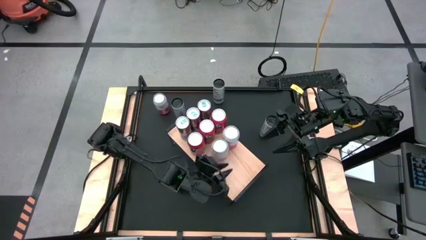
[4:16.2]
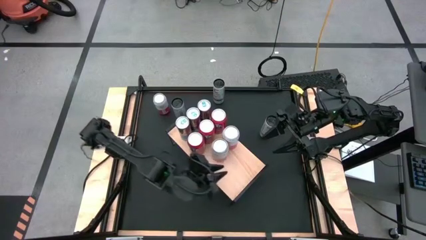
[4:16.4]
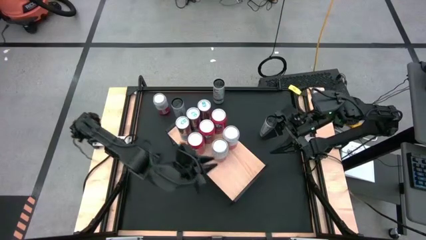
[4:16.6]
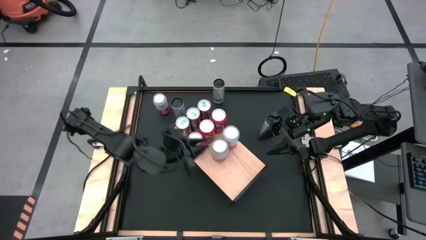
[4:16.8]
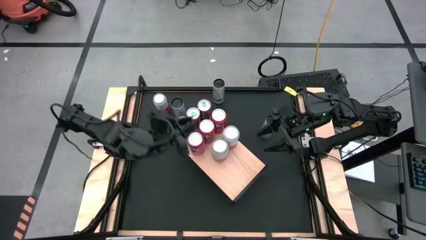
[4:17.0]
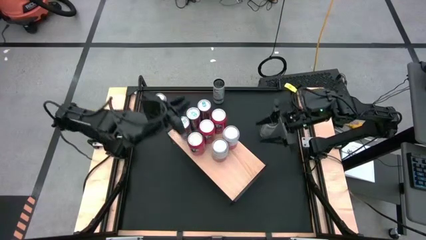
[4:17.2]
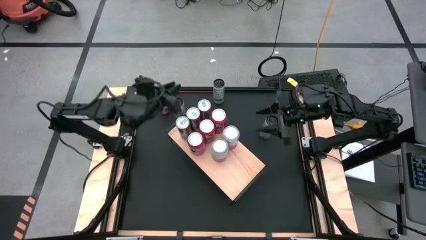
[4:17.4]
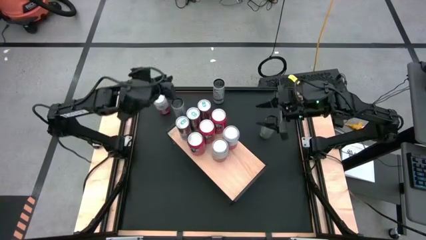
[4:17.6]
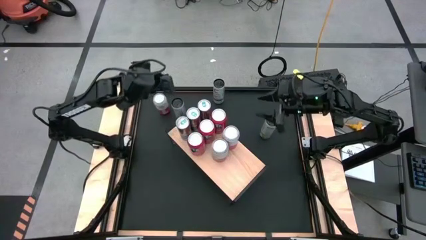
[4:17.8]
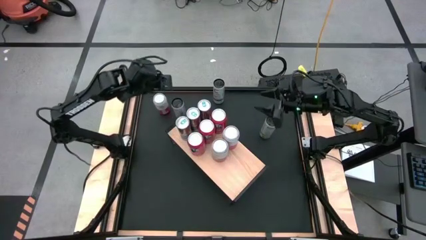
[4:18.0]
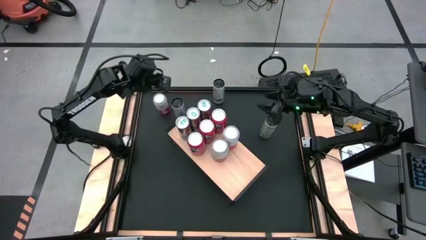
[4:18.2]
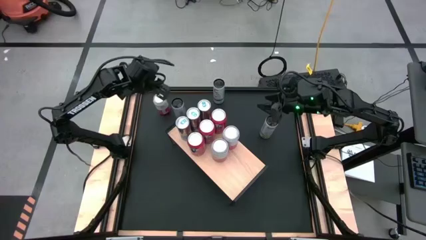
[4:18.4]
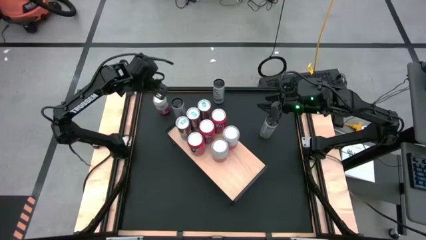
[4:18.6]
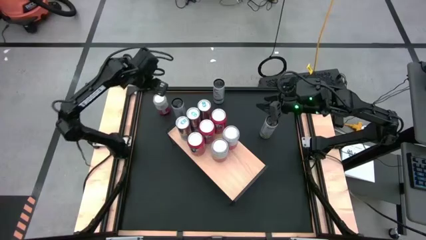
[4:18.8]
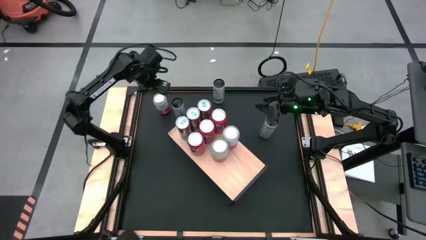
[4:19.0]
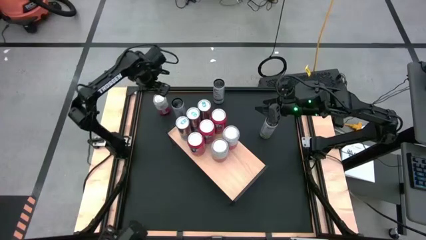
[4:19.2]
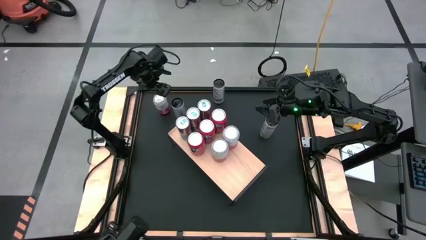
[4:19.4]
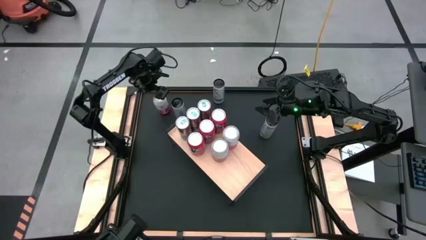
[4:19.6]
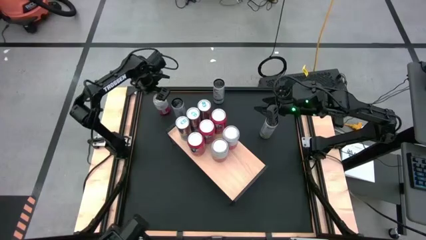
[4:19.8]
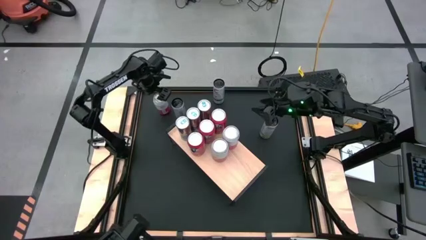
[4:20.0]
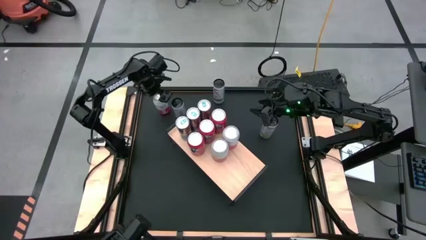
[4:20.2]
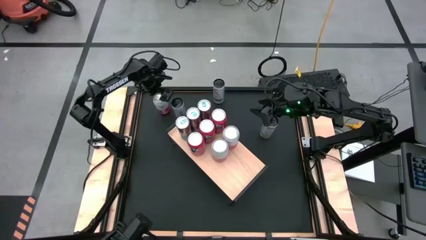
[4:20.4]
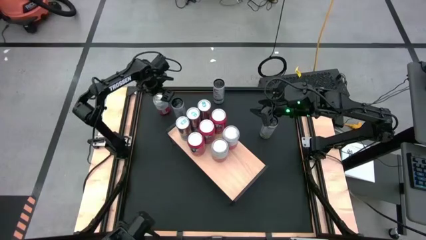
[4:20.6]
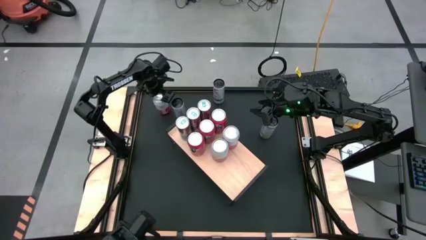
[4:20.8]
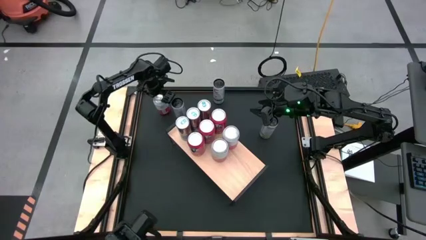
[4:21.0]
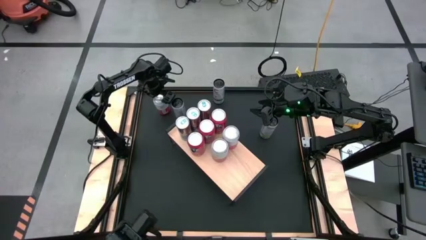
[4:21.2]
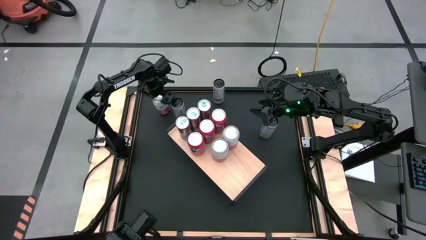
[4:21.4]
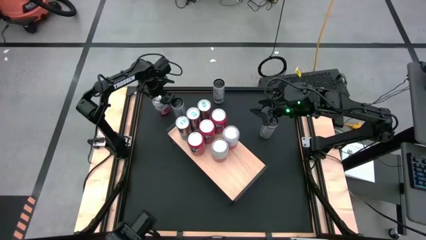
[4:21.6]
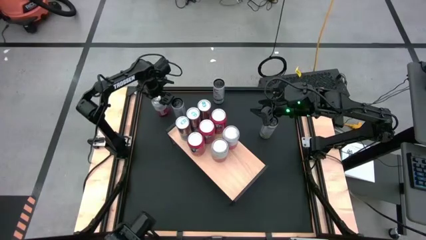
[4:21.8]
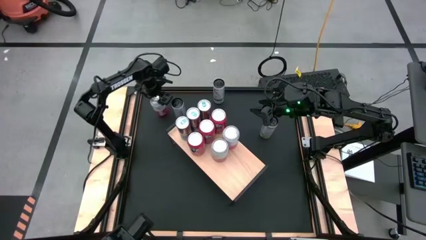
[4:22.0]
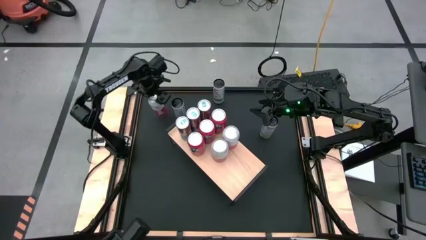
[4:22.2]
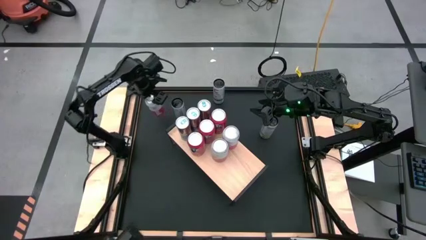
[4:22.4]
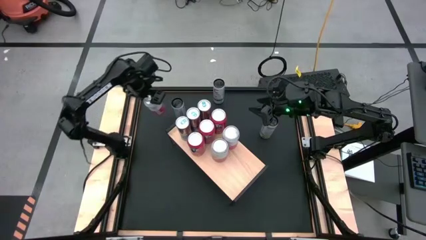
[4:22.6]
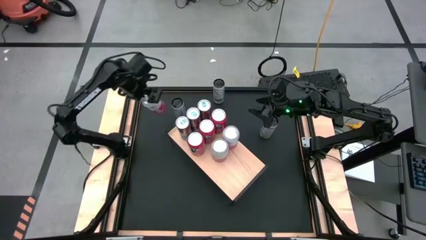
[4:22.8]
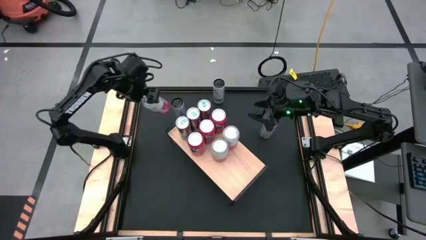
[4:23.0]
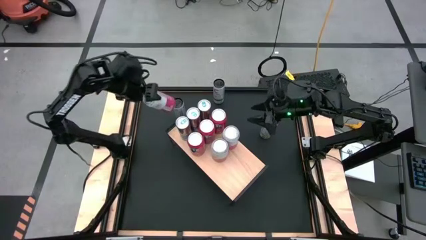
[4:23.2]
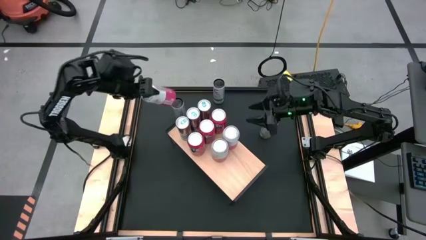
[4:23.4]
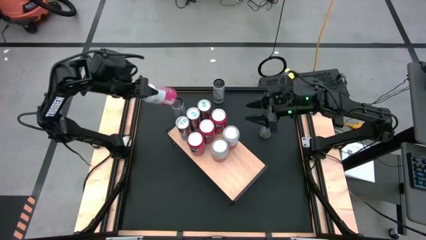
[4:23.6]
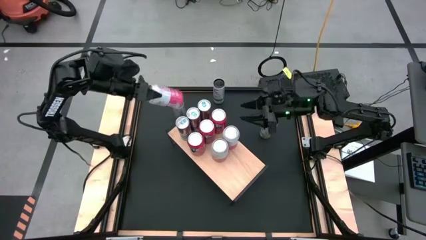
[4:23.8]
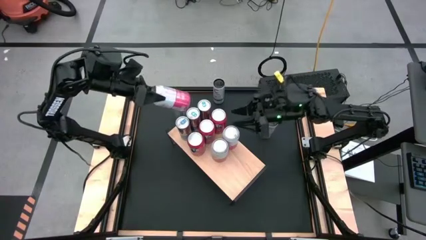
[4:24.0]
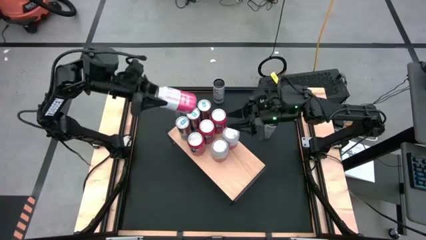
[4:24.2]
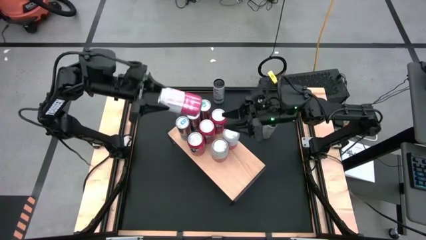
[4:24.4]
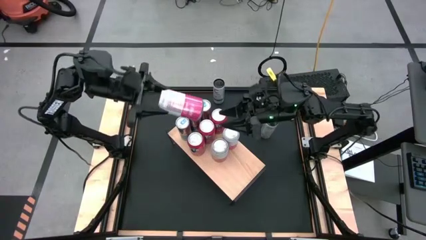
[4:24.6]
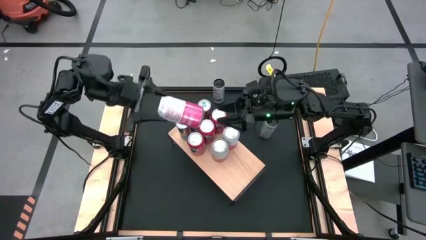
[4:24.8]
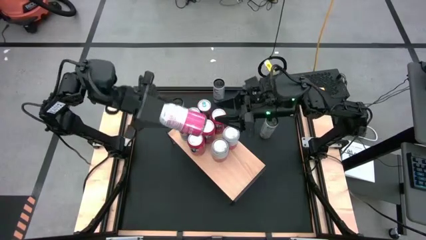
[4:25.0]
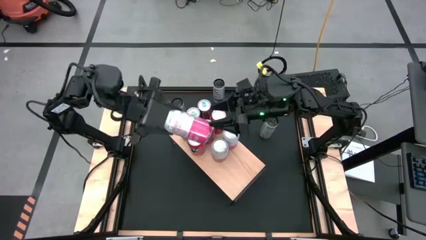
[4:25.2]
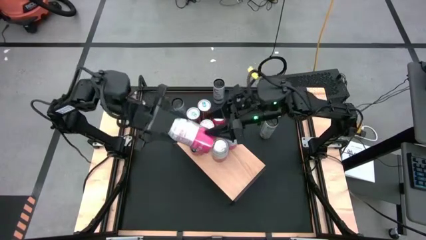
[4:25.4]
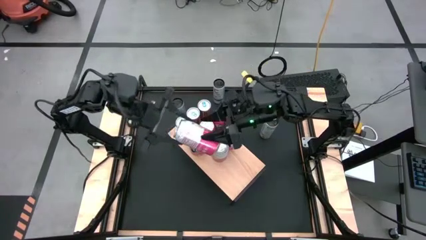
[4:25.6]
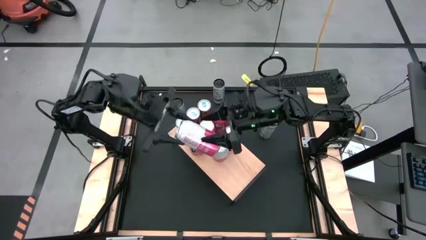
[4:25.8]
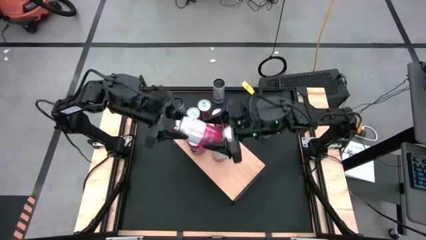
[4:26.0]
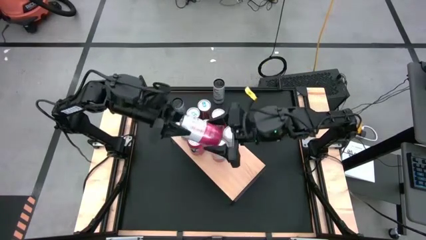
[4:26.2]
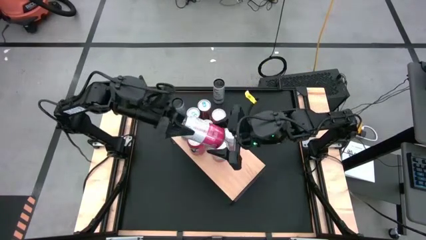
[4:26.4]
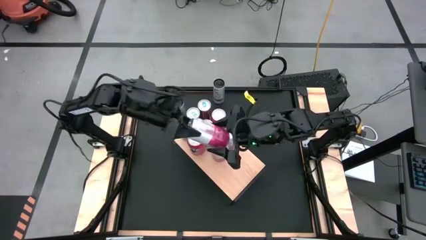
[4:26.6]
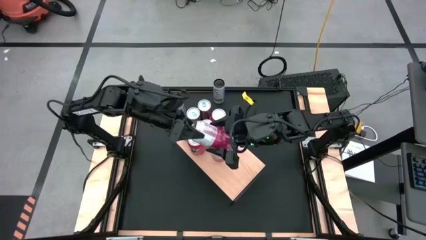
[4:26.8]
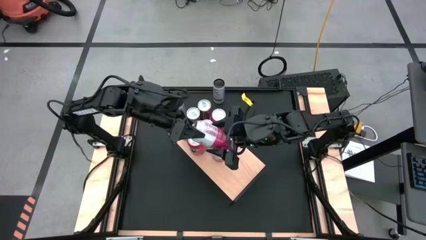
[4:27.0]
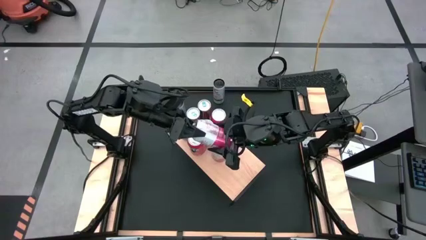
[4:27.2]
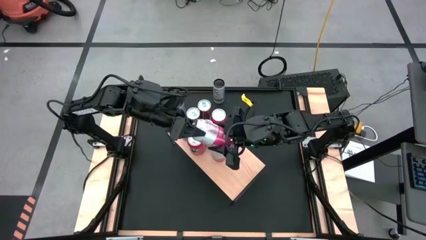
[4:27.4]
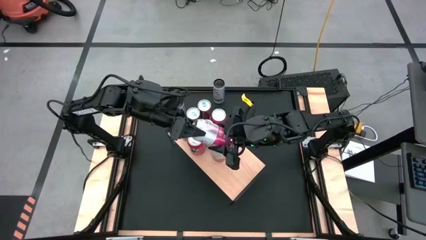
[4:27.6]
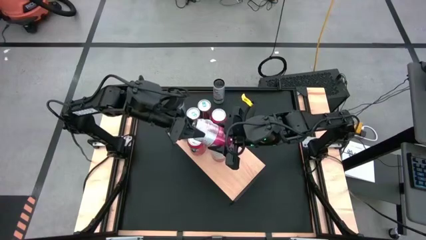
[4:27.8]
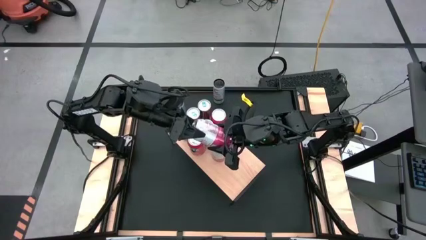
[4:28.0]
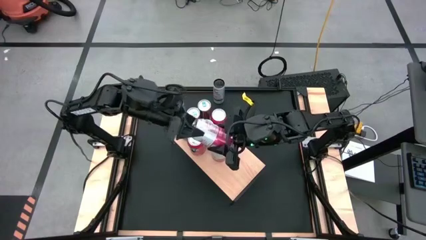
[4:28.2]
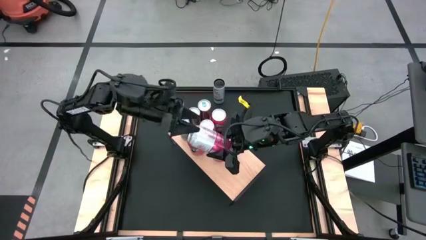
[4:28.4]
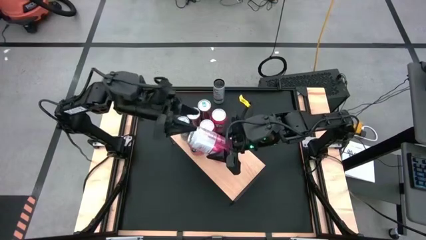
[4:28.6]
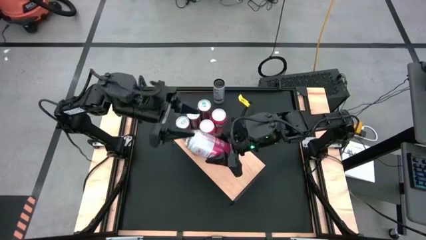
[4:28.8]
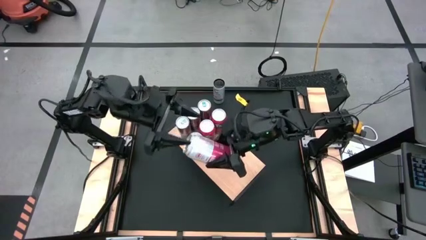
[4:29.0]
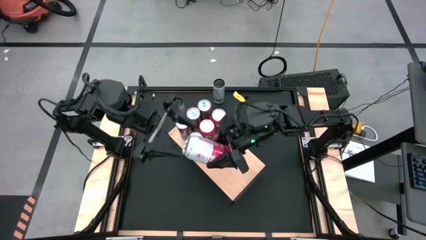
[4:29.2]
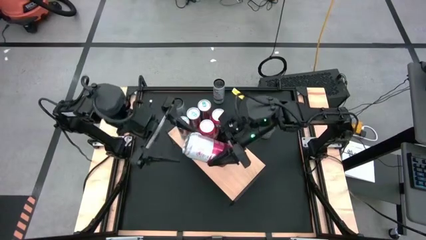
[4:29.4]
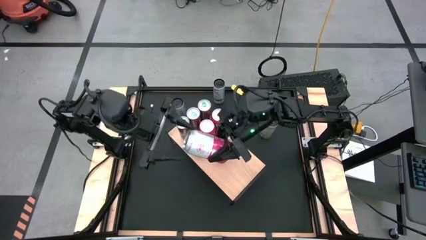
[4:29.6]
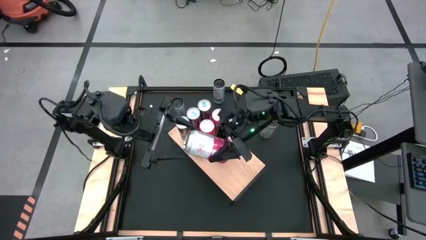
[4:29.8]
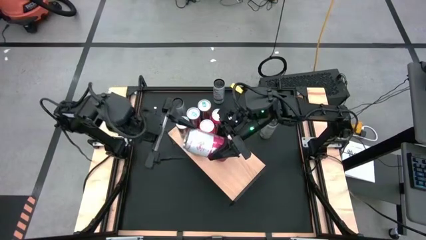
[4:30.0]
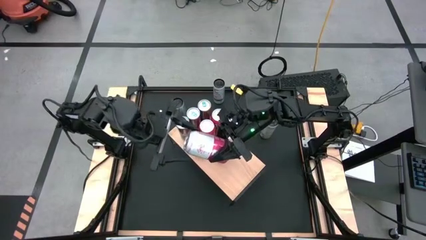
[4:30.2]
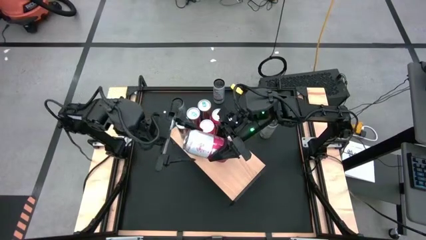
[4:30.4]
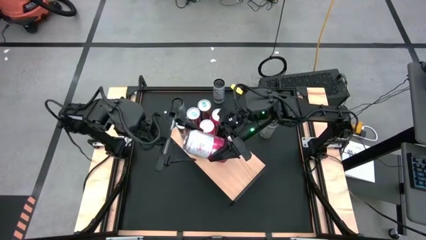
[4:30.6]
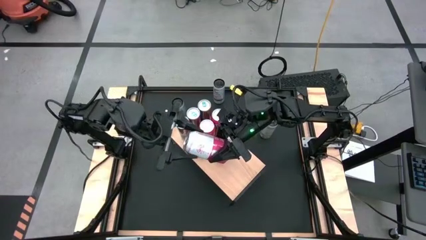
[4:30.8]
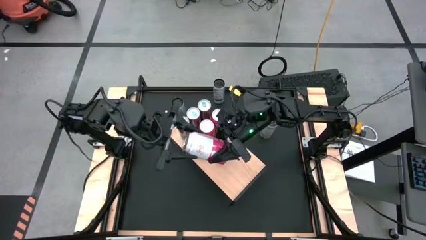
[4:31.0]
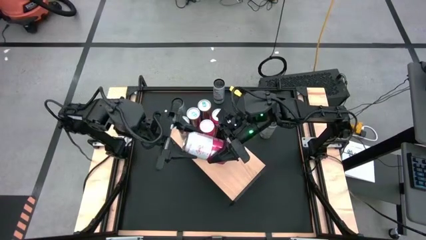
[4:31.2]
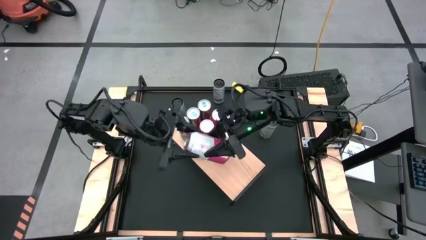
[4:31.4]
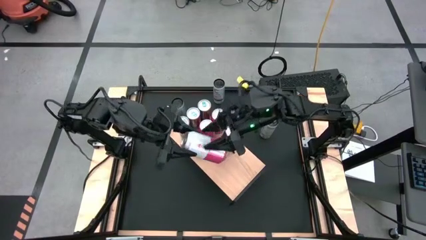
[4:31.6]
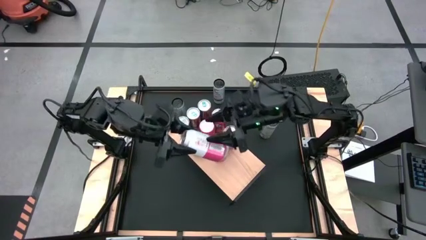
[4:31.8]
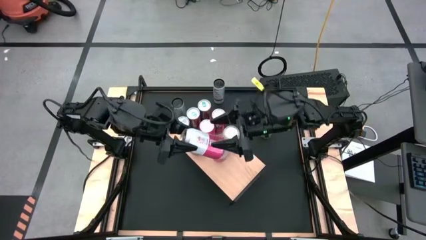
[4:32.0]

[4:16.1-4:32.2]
Task: Place canned beverage on shelf
Put the pink soda can on the shelf aligned with the other pink soda cans
